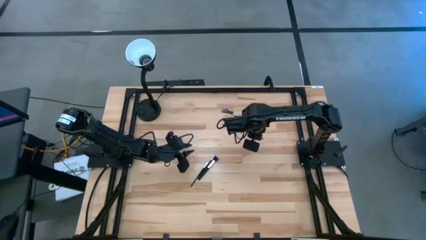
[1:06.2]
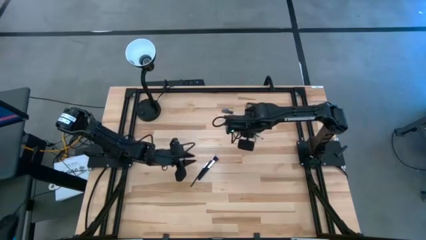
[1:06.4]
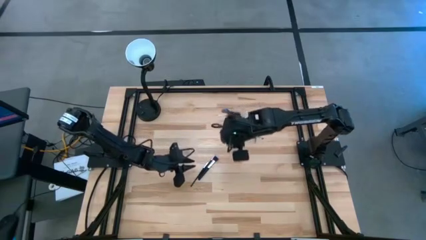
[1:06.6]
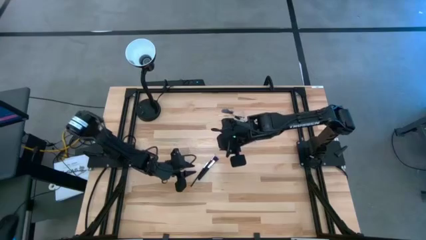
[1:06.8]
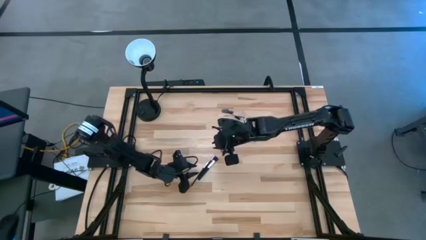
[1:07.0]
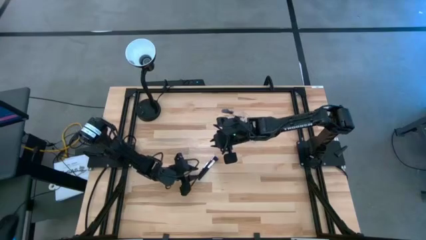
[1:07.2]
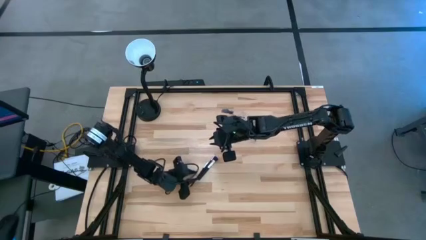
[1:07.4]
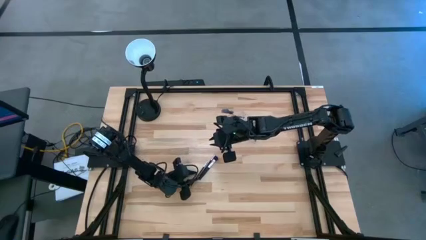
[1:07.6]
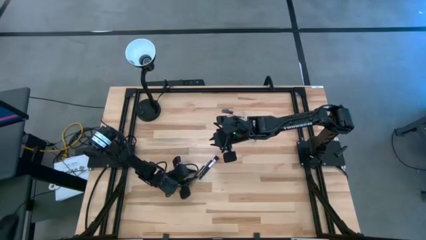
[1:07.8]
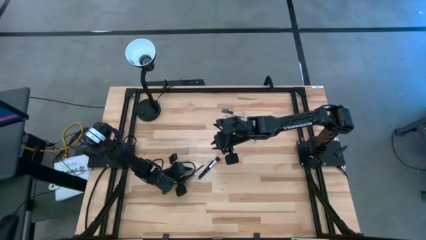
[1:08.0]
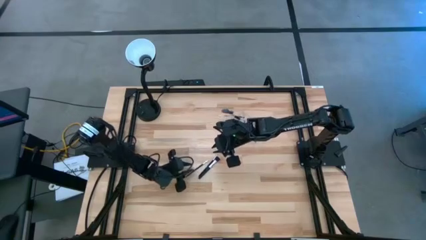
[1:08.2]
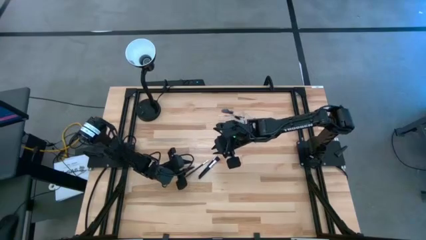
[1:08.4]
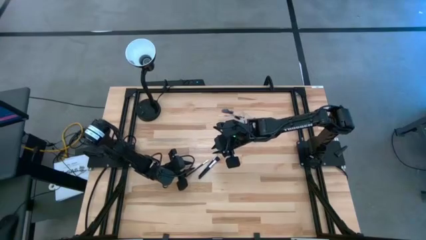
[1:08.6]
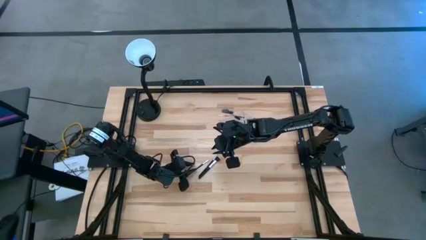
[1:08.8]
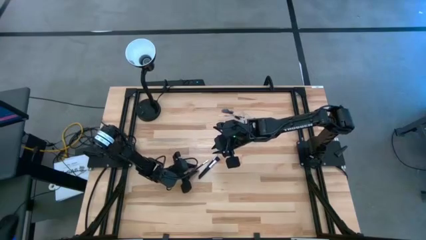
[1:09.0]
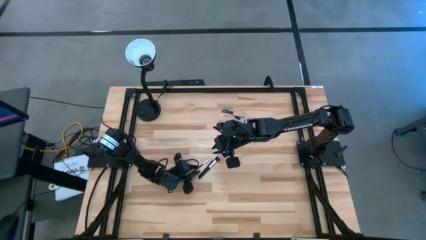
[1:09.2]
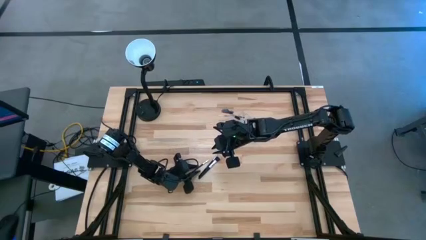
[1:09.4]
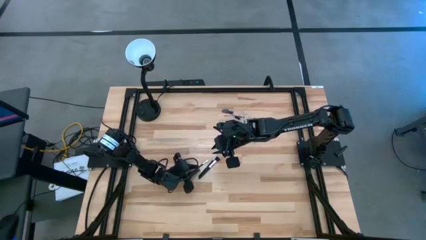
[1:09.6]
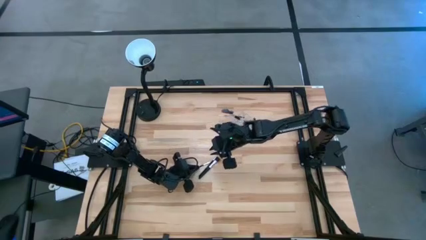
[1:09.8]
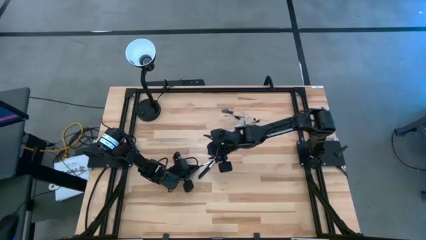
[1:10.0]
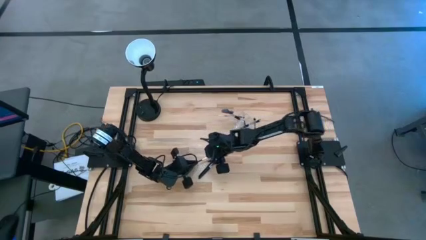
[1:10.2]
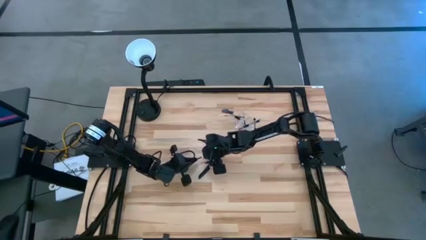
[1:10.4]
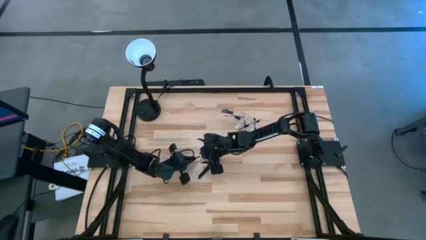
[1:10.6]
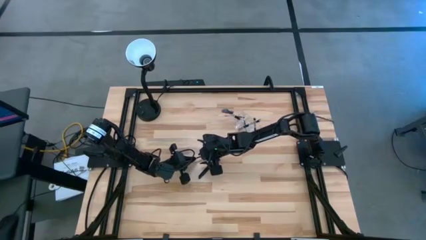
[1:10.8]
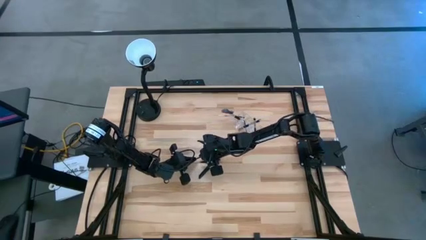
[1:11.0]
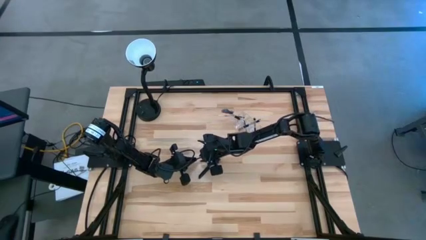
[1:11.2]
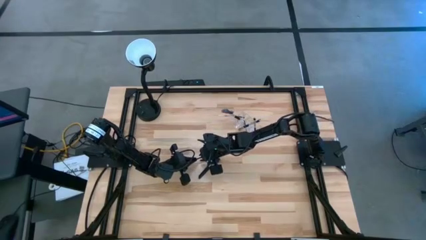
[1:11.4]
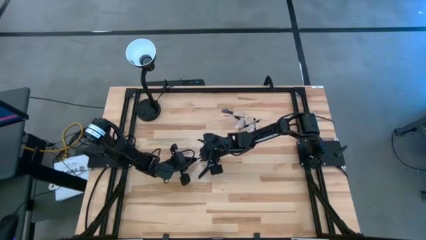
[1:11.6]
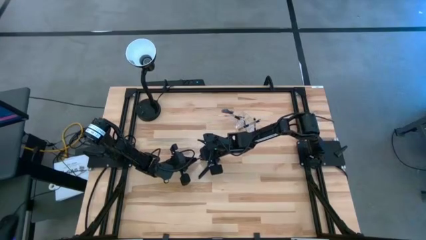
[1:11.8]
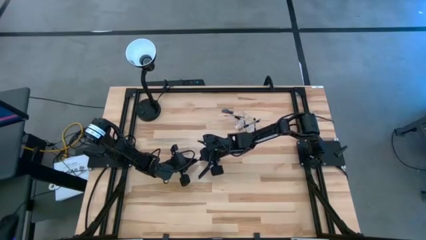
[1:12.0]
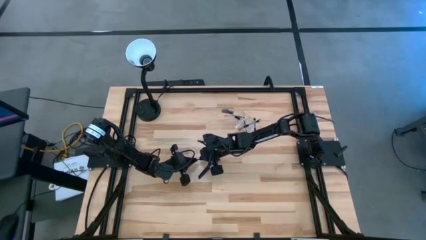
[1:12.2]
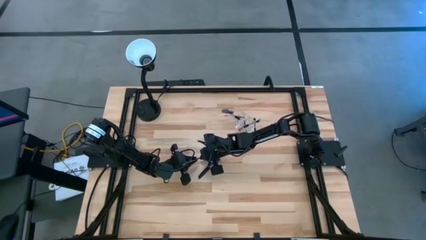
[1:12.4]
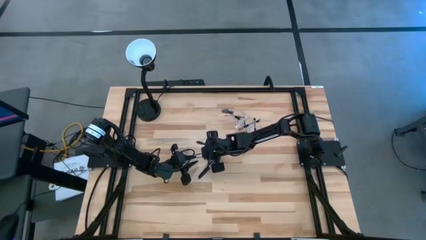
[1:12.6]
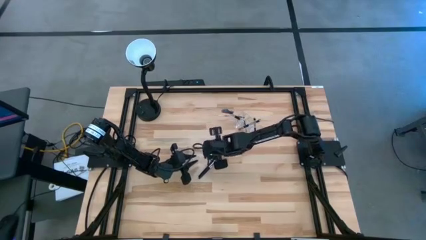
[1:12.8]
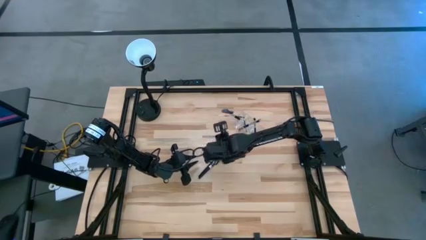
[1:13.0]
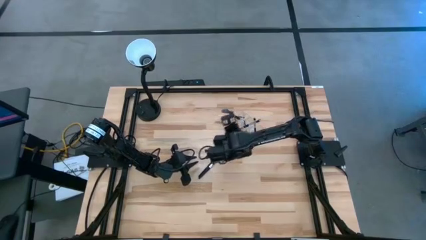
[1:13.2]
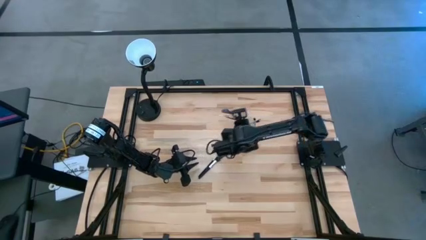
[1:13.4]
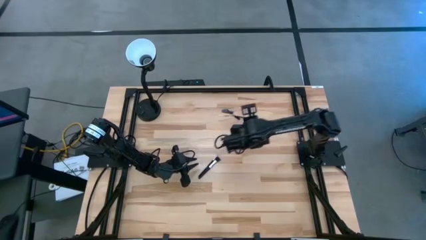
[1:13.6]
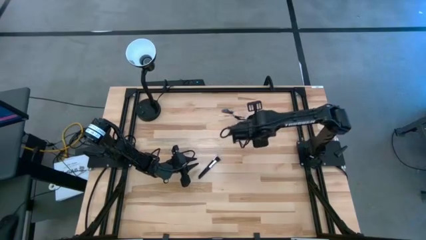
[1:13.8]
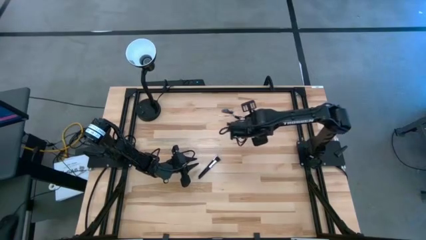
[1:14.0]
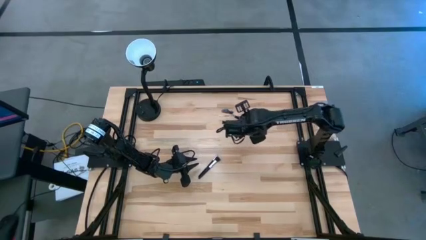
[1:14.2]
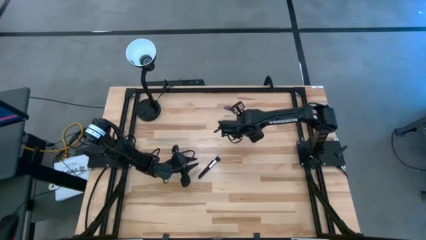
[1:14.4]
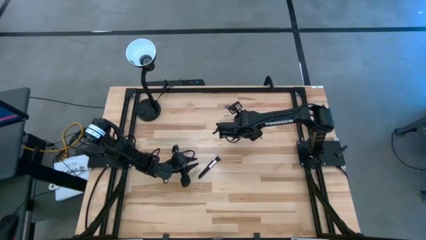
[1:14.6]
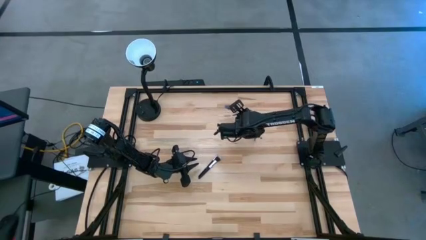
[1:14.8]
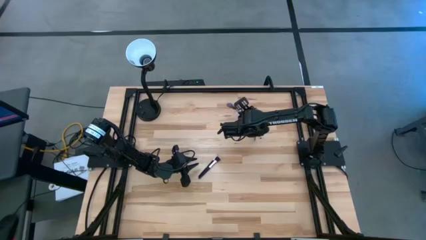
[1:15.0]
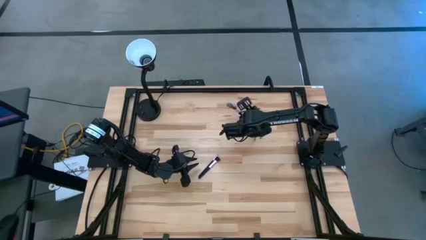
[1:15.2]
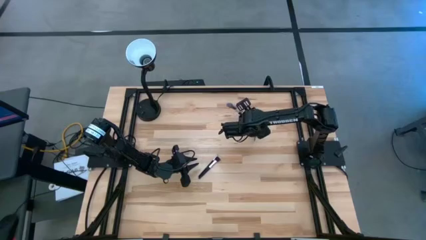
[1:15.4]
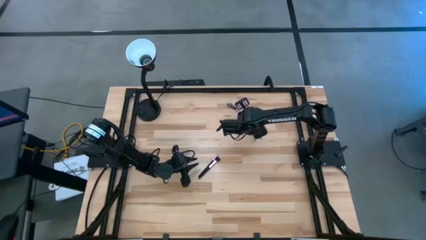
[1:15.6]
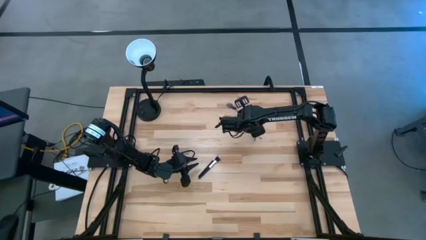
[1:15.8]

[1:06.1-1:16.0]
Task: Sort items
Put the eyeshadow brush into the left side of the transparent organizer

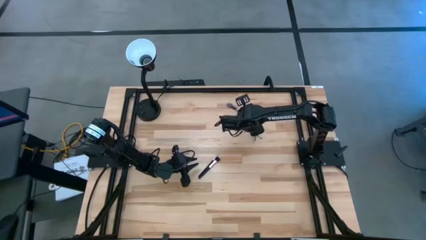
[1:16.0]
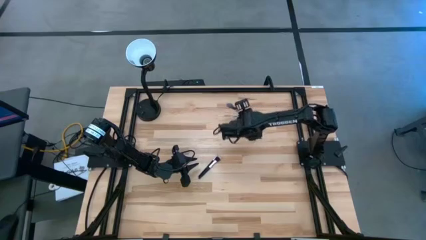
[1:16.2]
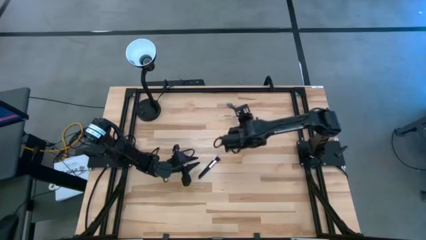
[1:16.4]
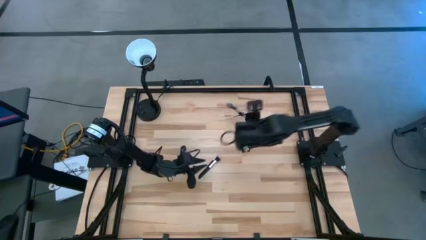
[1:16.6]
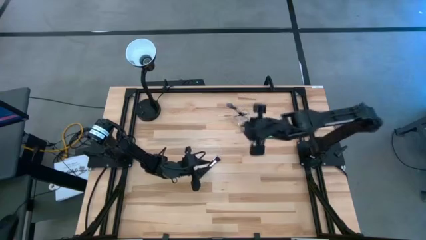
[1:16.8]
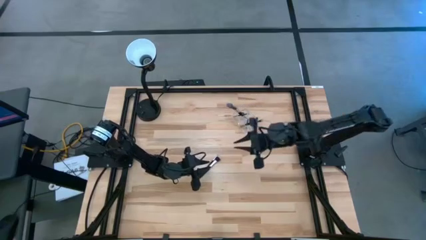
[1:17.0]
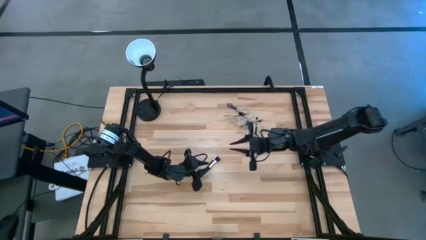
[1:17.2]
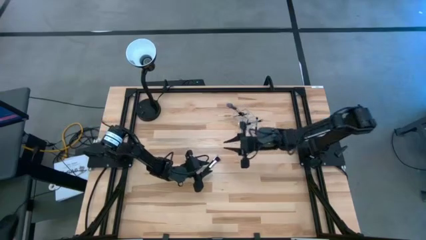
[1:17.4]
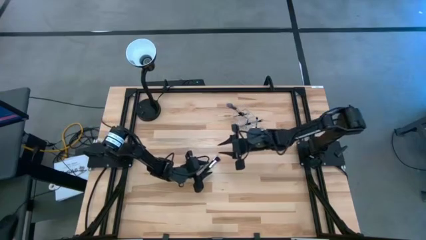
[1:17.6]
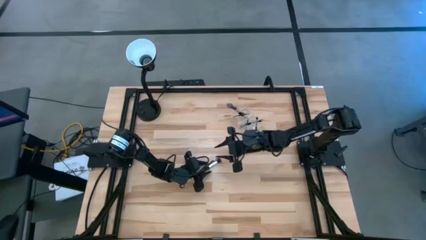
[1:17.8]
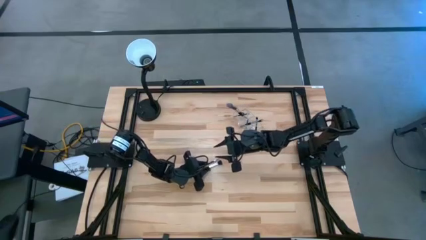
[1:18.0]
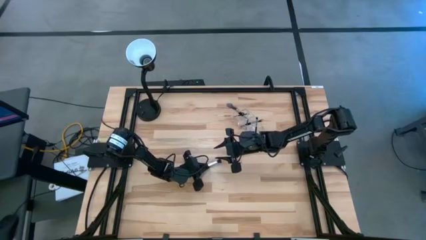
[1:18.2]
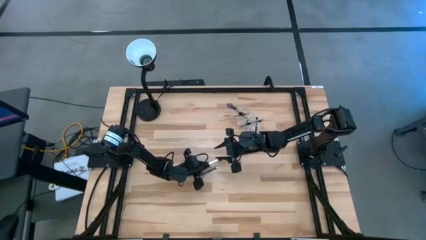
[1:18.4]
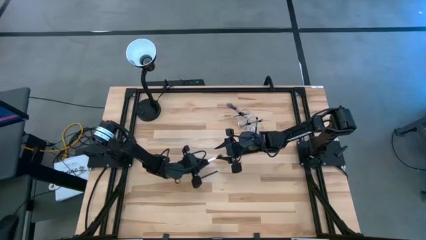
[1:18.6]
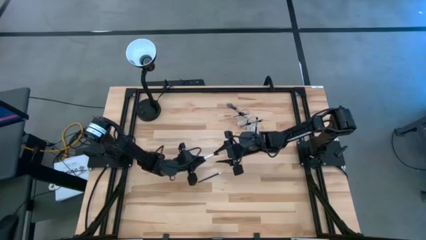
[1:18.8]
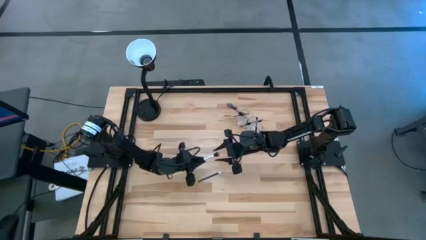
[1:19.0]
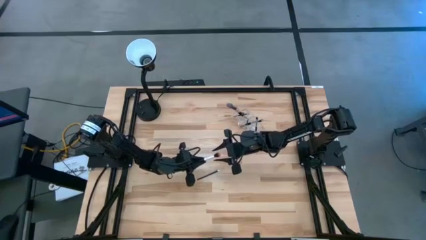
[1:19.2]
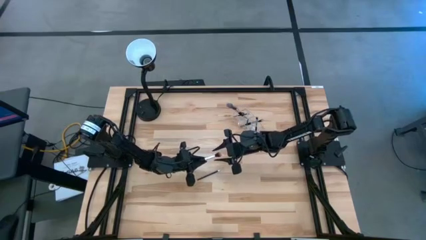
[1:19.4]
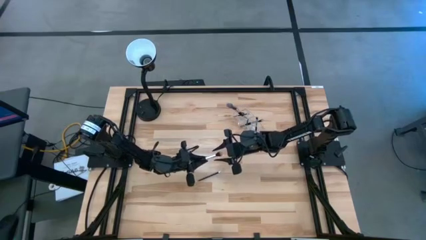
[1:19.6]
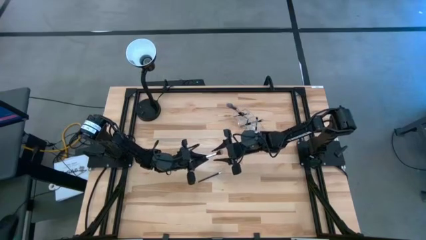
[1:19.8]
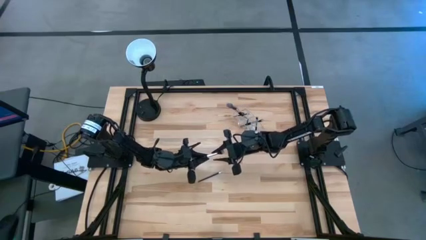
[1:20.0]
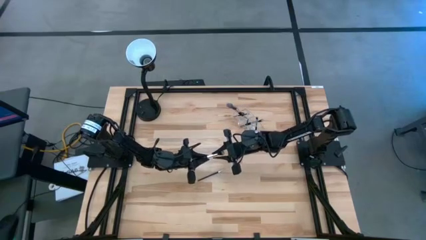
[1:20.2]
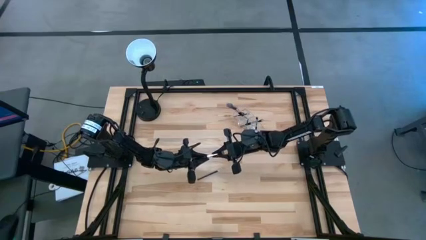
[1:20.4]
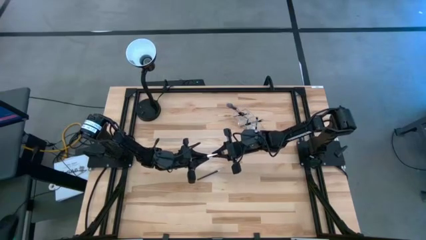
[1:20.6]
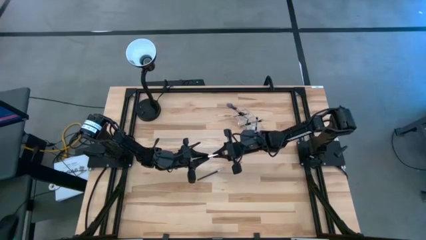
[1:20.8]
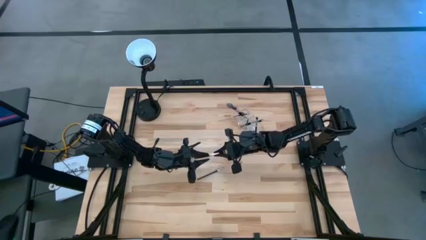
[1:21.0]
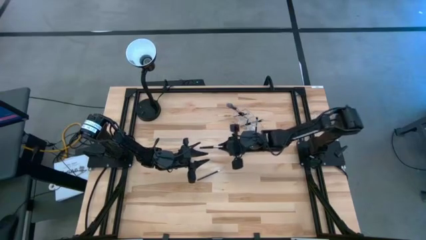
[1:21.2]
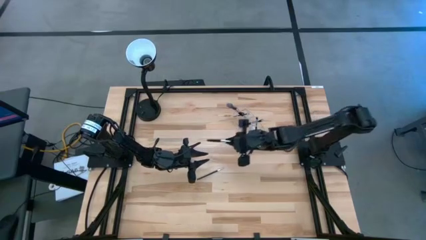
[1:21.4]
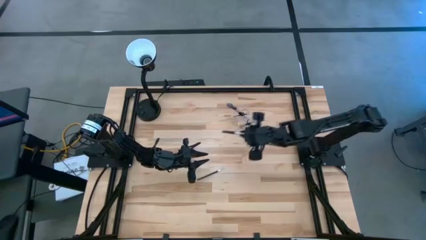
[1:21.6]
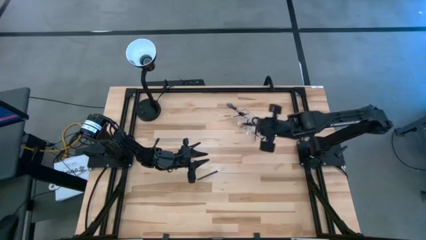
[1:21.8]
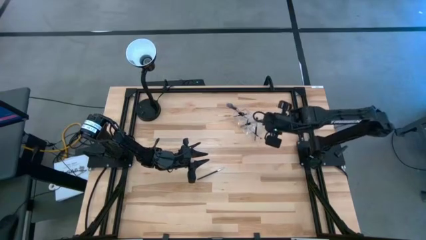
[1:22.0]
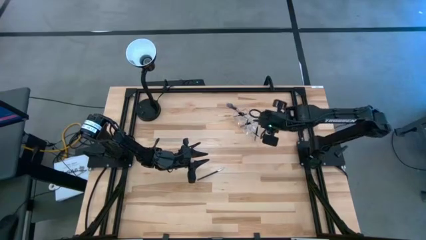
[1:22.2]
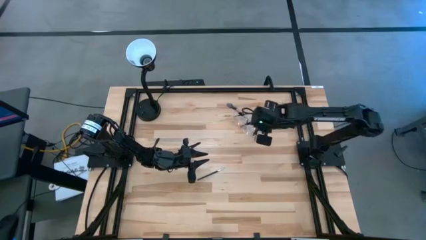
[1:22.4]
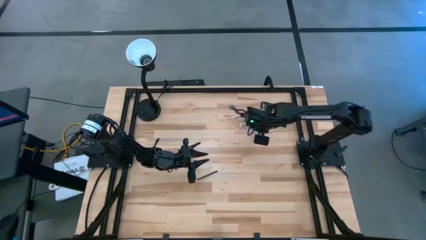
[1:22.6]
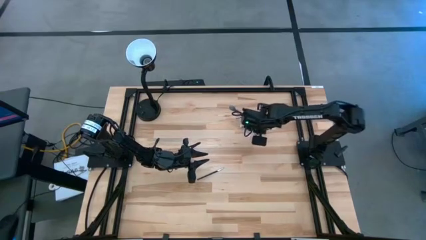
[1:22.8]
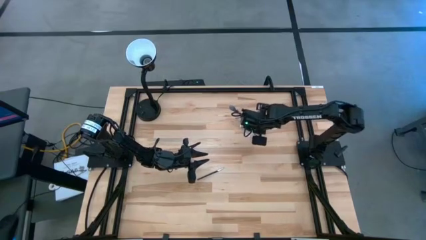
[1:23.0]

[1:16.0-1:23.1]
Put the powder brush into the middle of the transparent organizer

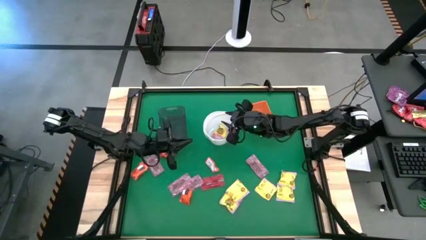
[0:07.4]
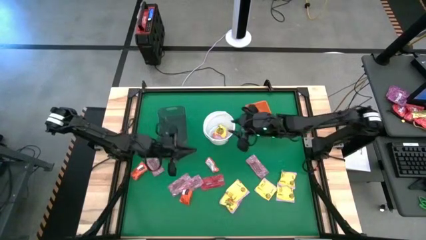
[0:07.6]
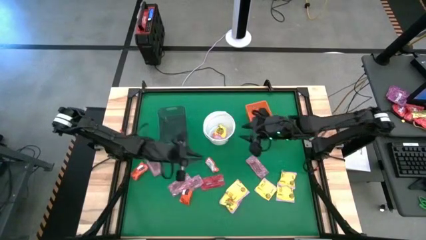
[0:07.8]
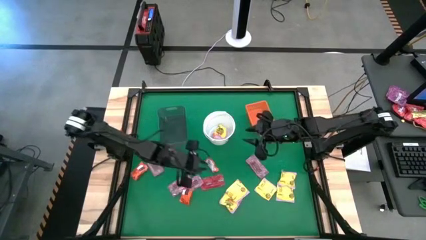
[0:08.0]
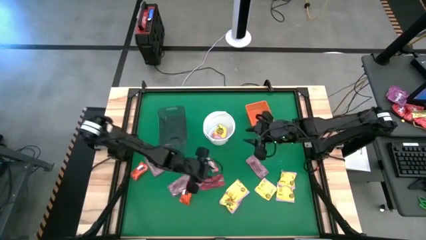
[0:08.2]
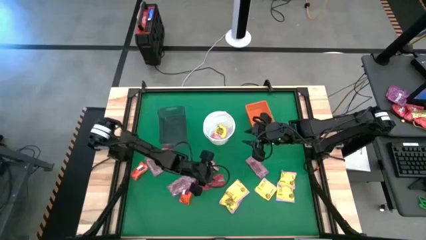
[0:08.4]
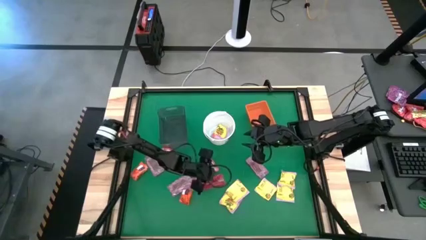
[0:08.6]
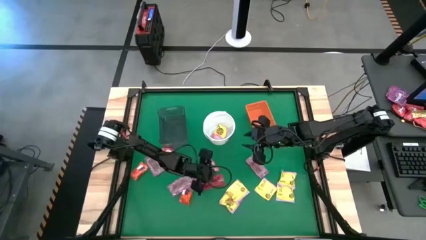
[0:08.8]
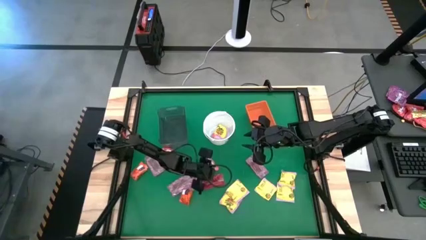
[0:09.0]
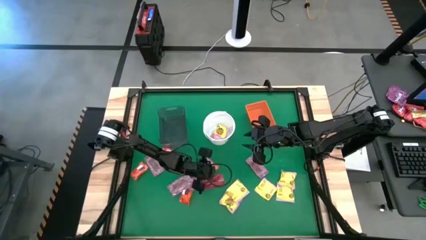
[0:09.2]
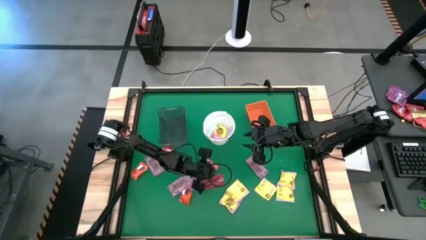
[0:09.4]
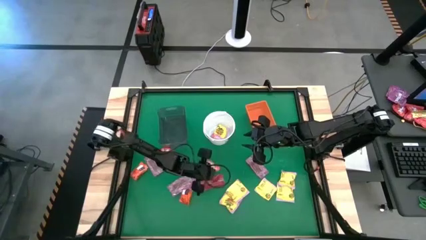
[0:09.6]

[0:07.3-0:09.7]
Task: Sort candy by brand, put in halloween buckets
Put the orange chocolate into the black bin
